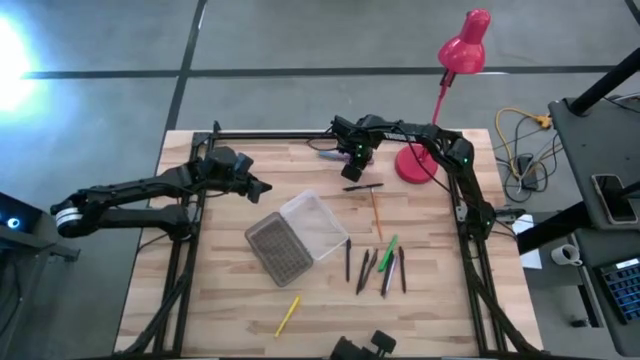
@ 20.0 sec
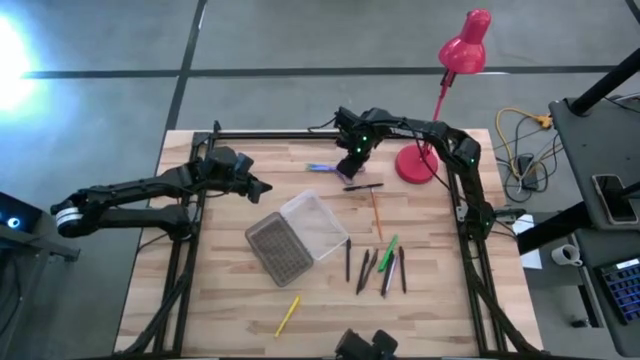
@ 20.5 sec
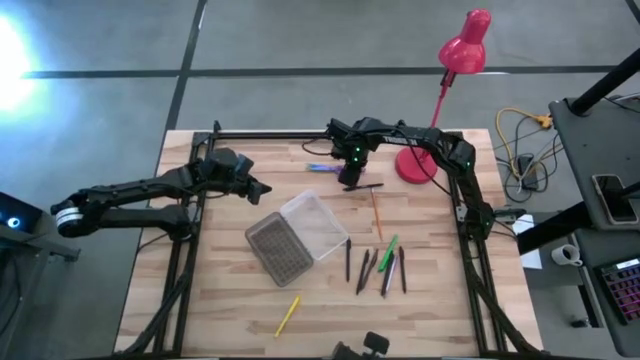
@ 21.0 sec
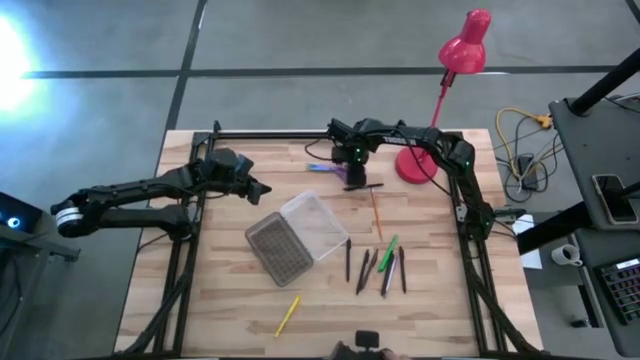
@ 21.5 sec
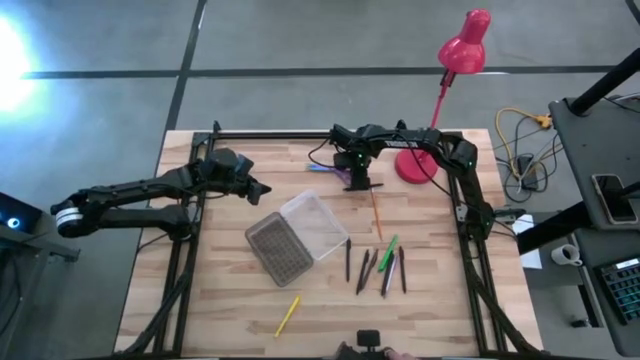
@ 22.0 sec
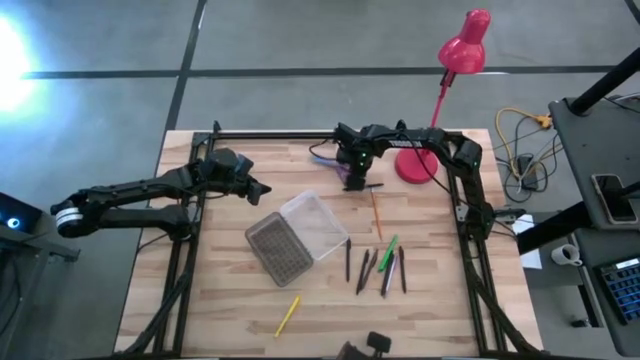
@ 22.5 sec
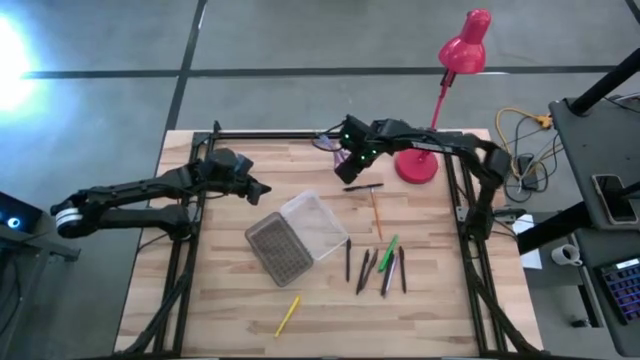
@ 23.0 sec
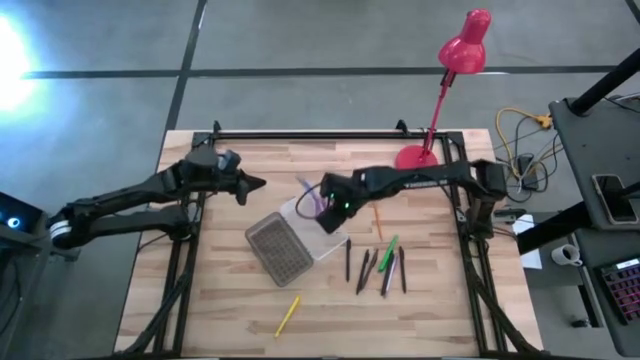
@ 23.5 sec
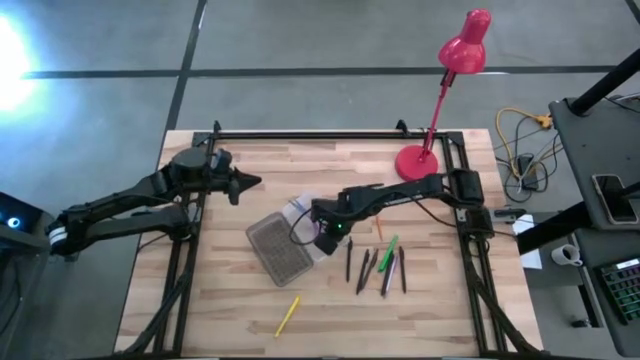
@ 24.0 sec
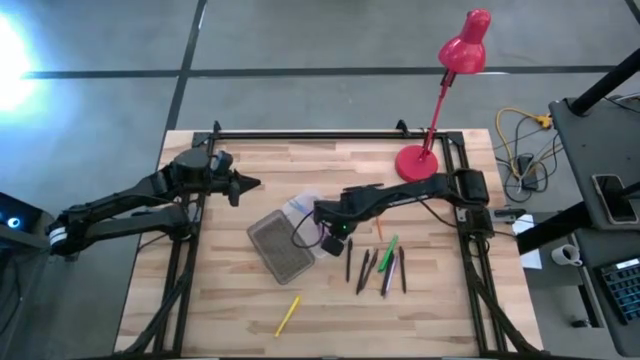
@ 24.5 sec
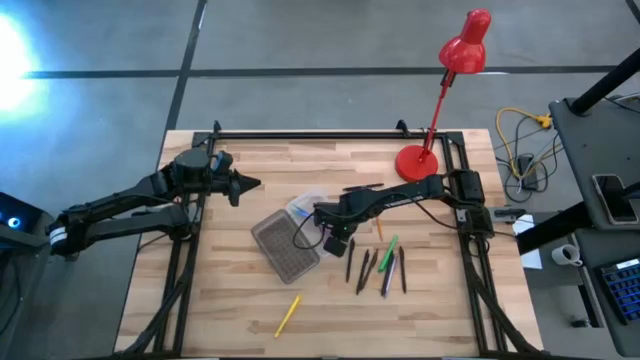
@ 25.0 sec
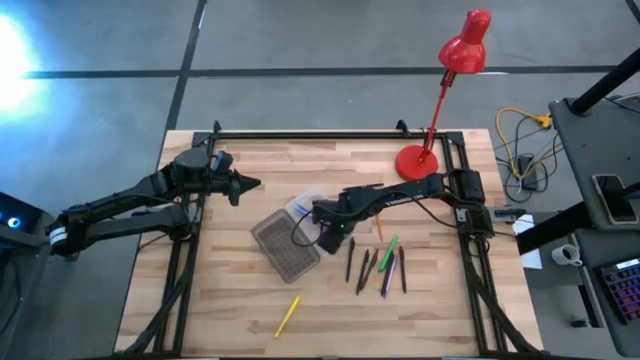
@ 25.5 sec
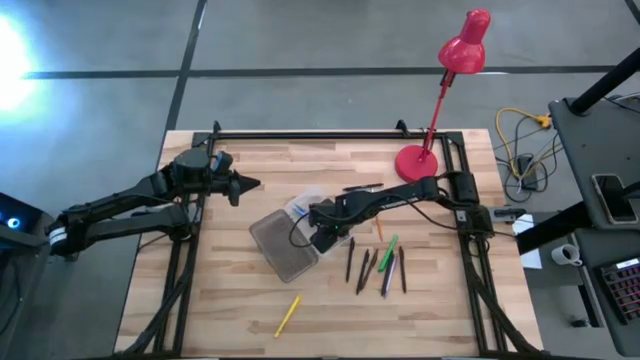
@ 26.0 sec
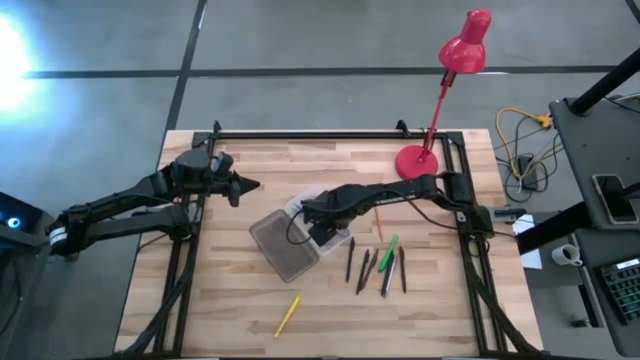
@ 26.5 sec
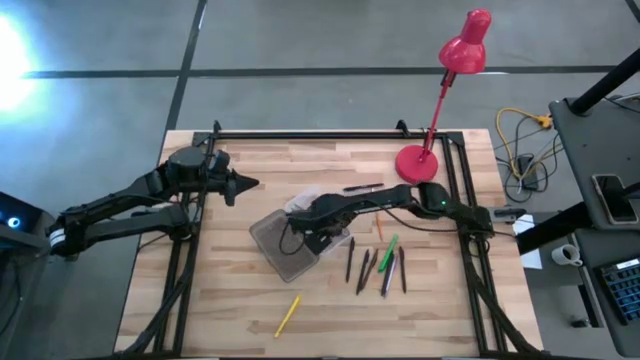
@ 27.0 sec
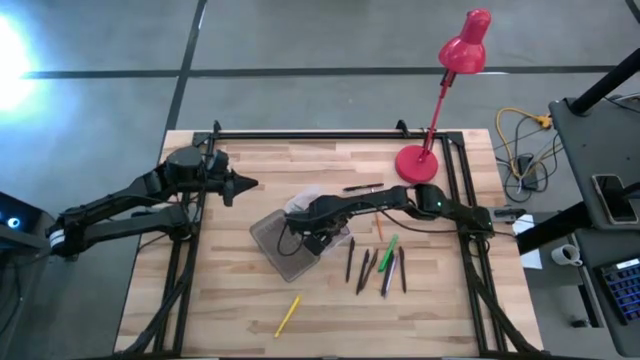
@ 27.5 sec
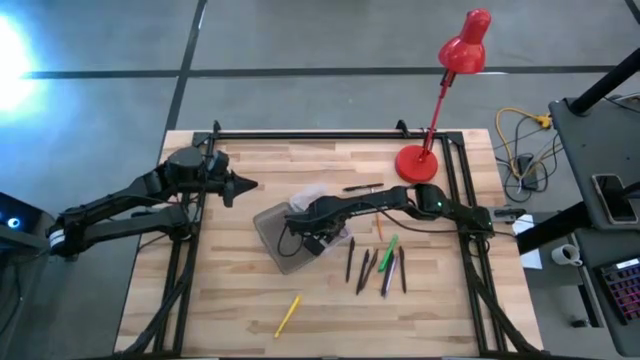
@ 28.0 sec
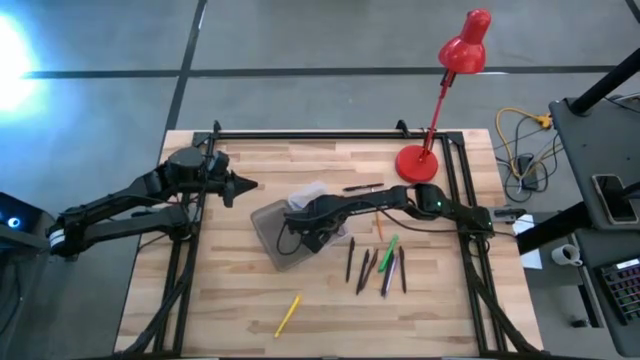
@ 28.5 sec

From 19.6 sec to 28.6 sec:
Task: Pick & place school supplies into a supply box
Put the purple scissors into the gray supply box

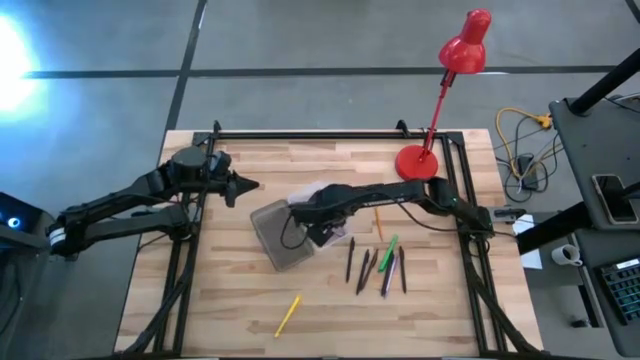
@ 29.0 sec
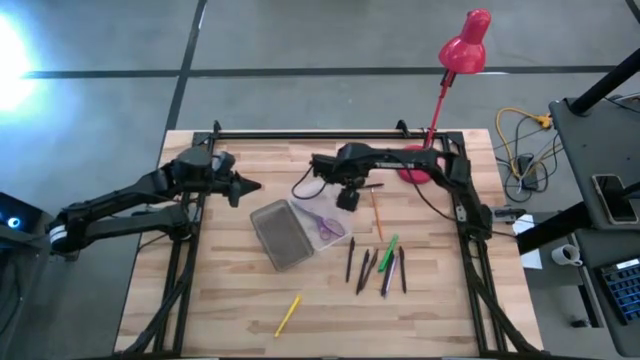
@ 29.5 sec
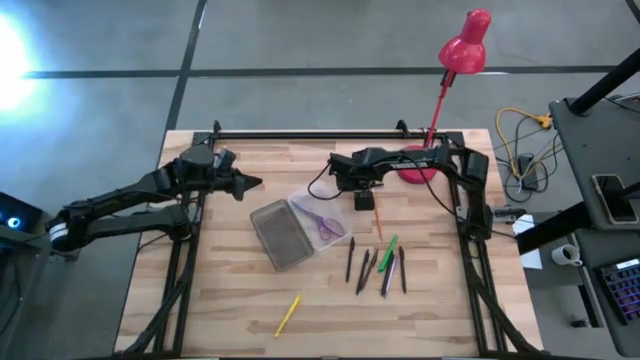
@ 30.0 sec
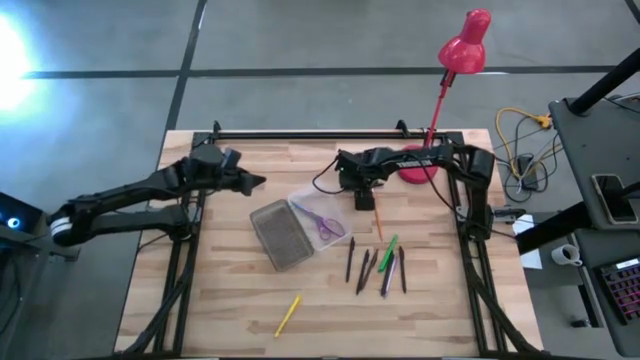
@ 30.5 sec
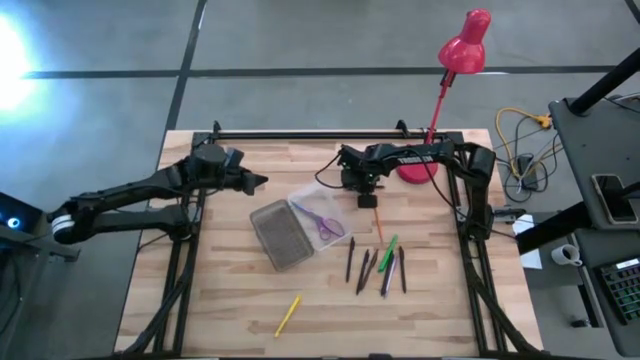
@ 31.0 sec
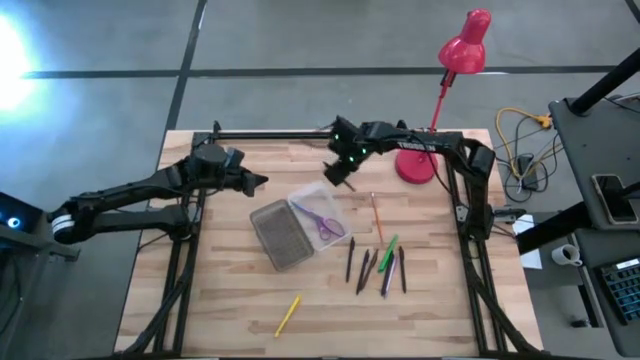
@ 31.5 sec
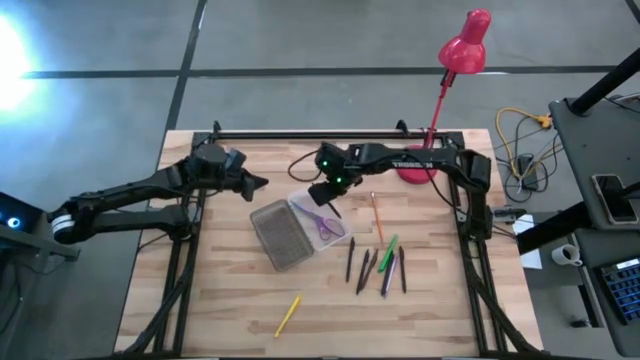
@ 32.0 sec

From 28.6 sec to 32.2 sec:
Put the black pen into the gray supply box

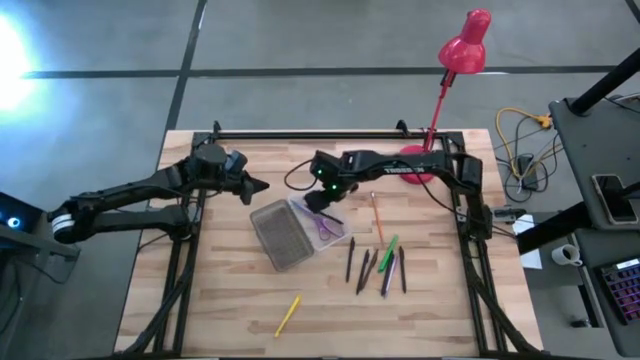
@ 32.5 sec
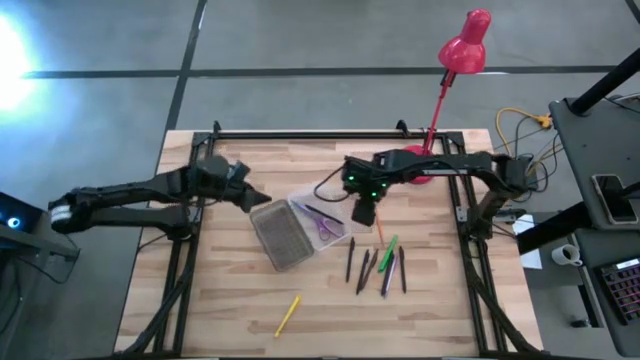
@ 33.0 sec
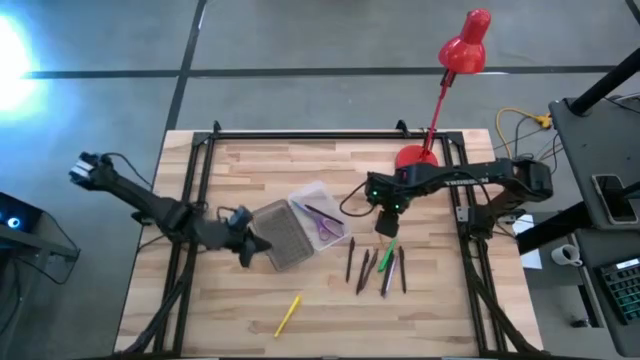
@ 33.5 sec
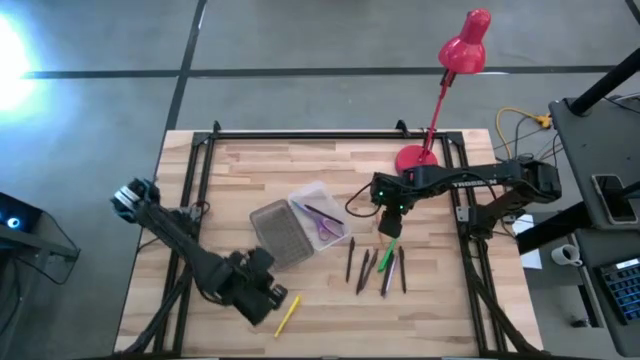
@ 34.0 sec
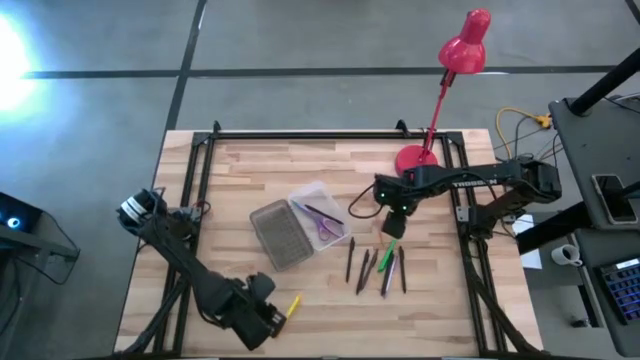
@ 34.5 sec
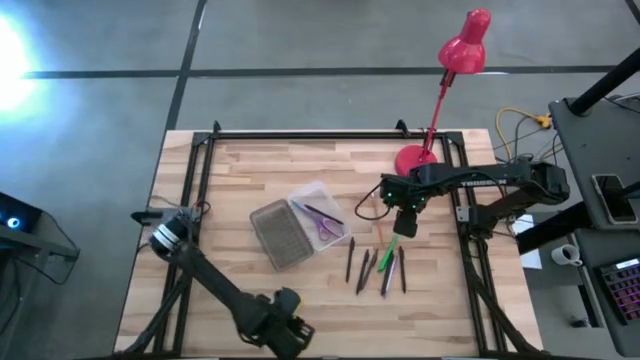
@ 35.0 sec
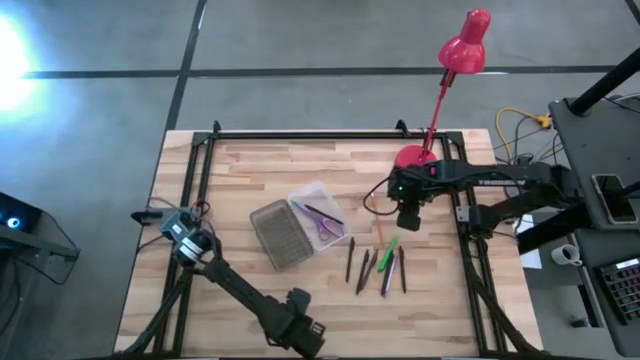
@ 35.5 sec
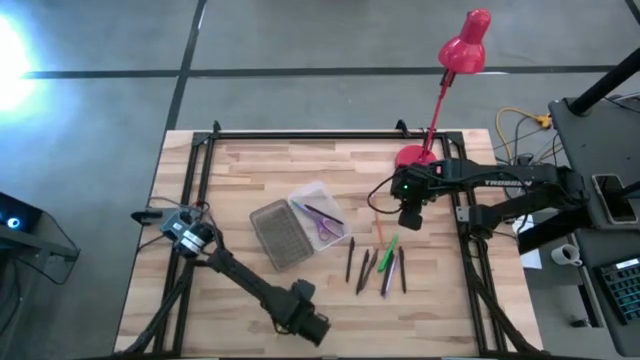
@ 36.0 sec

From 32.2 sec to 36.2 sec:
Put the yellow pen into the gray supply box

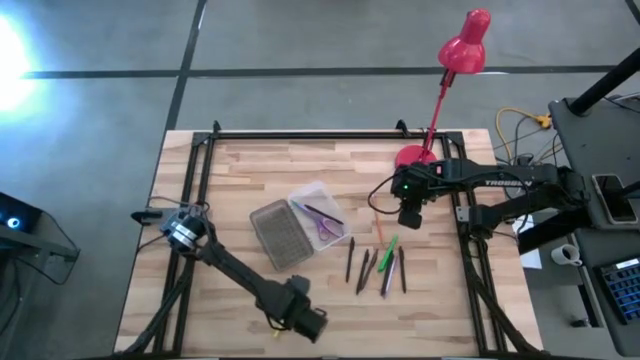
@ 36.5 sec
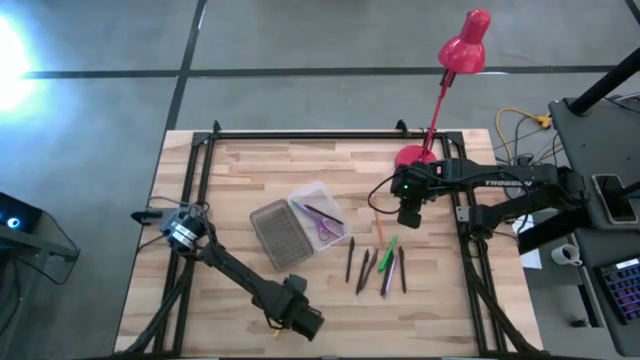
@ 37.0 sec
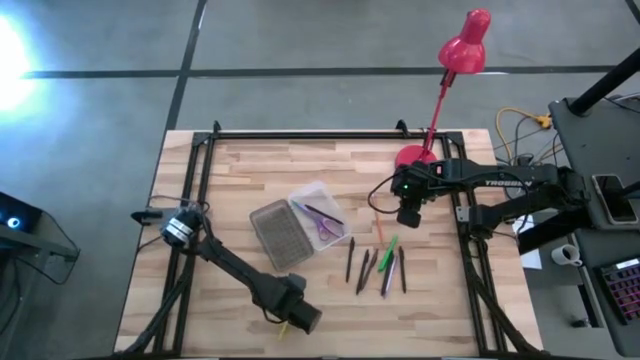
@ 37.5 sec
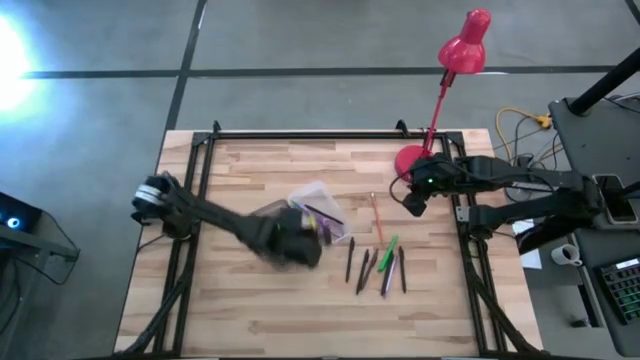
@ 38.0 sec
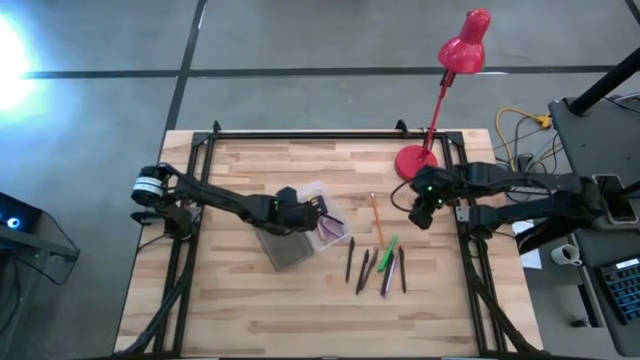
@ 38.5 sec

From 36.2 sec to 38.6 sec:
Put the yellow pen into the gray supply box

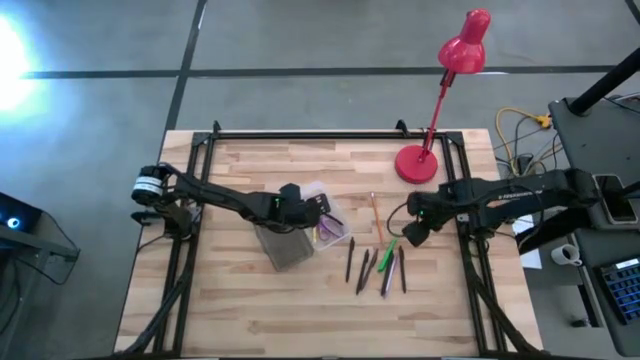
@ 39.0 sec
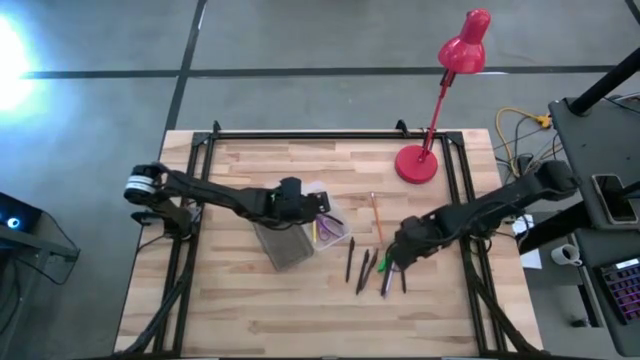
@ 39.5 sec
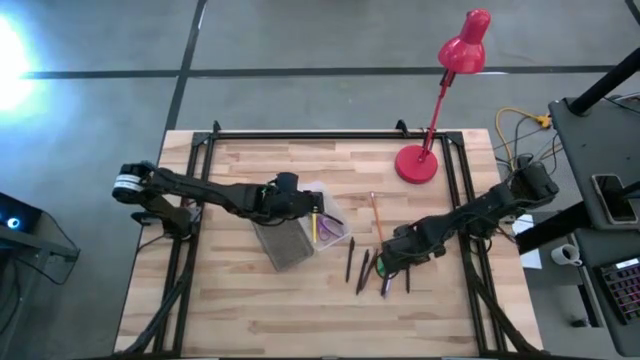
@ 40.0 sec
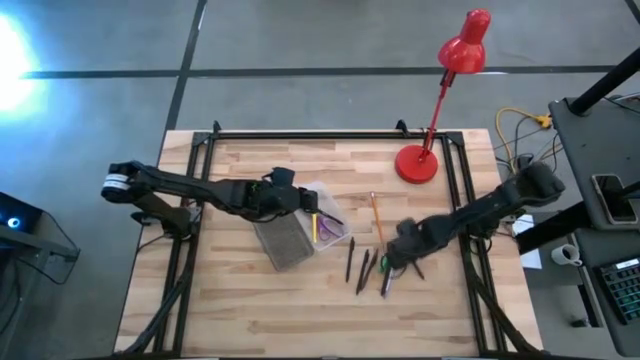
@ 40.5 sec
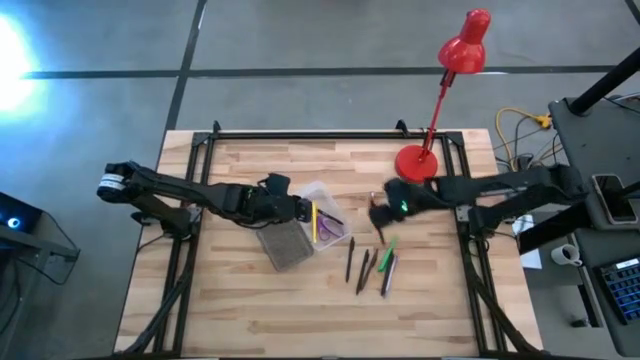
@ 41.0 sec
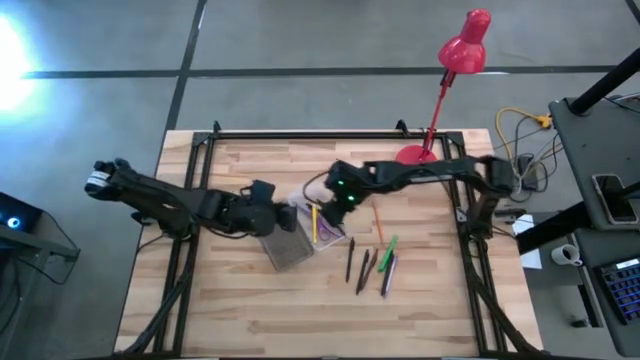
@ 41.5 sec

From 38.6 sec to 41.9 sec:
Put the black pen into the gray supply box
